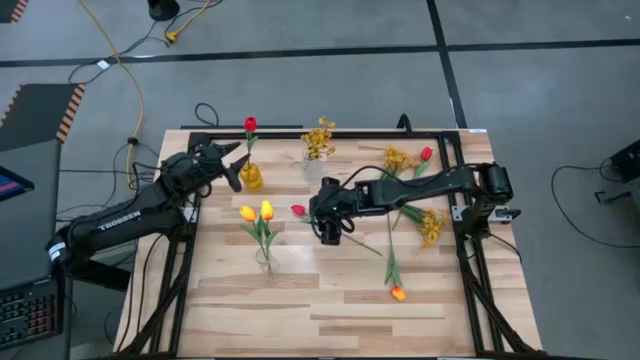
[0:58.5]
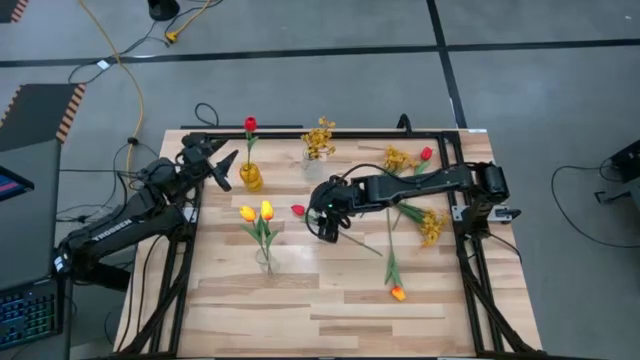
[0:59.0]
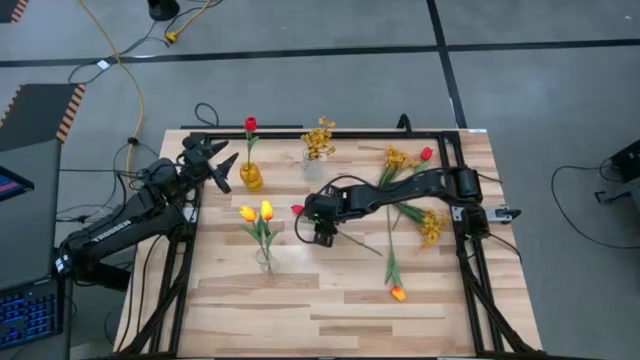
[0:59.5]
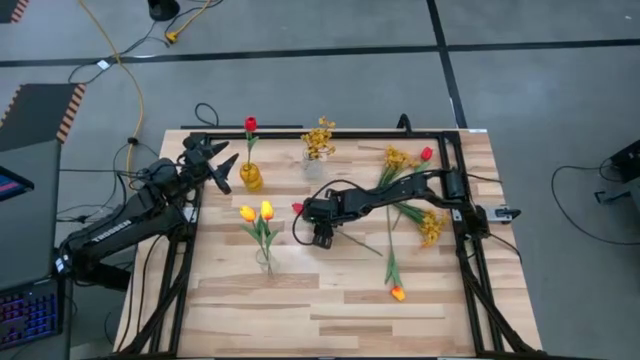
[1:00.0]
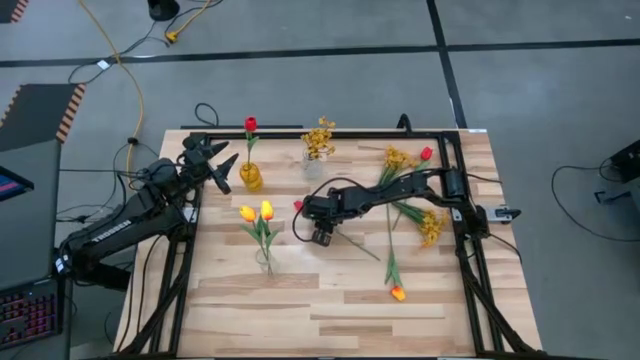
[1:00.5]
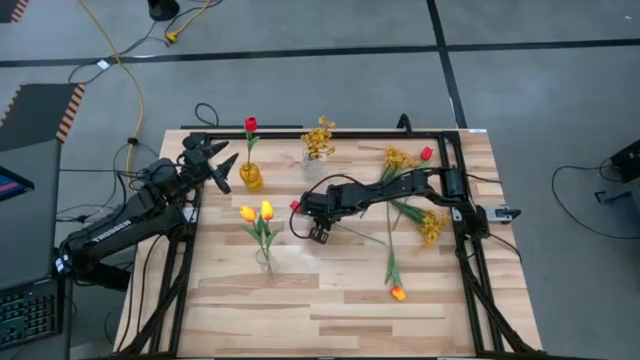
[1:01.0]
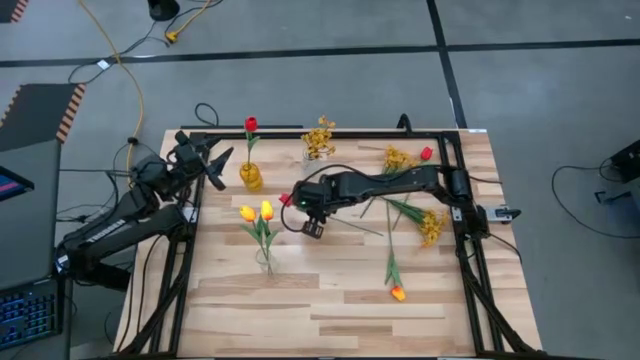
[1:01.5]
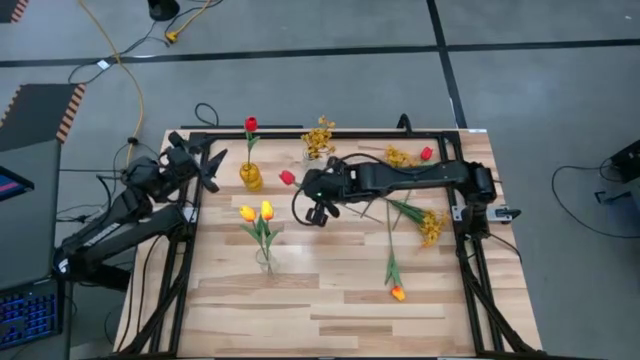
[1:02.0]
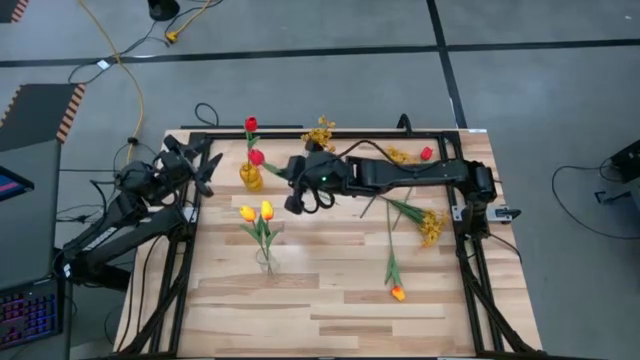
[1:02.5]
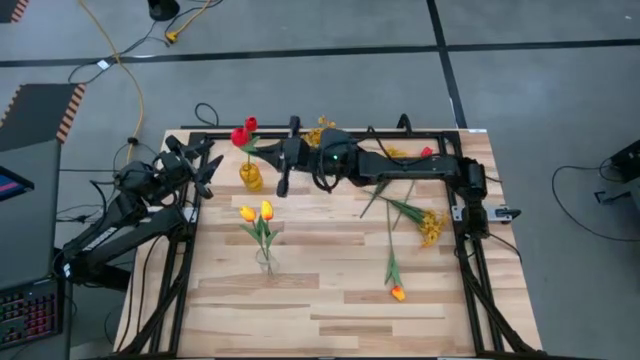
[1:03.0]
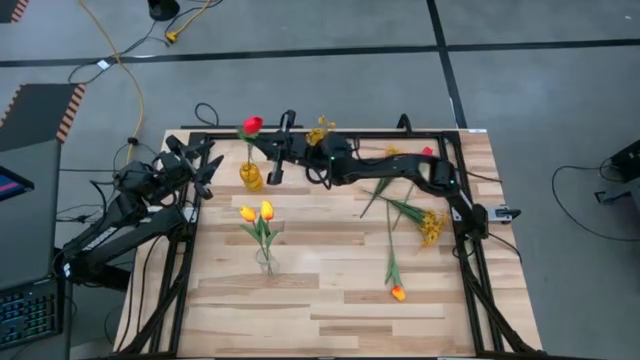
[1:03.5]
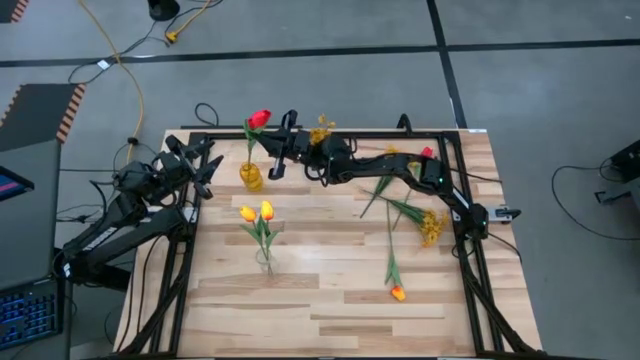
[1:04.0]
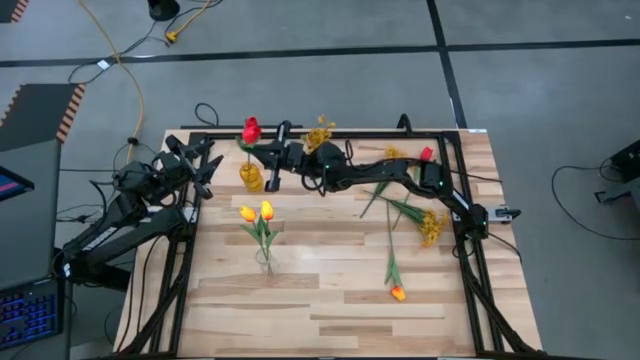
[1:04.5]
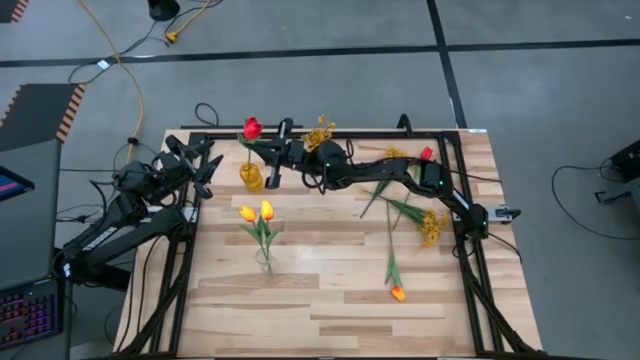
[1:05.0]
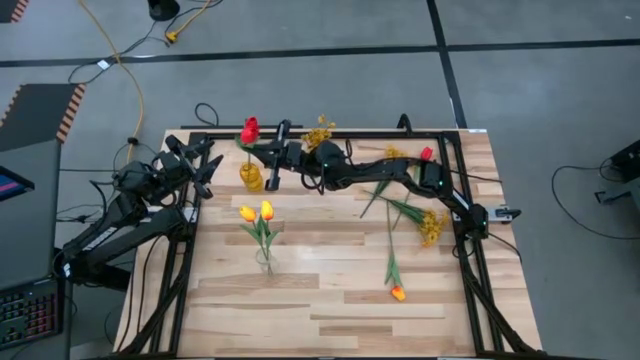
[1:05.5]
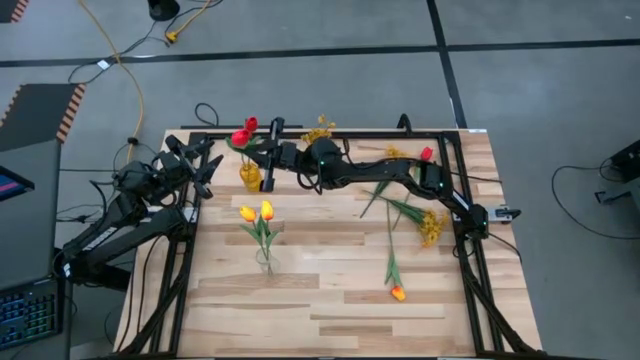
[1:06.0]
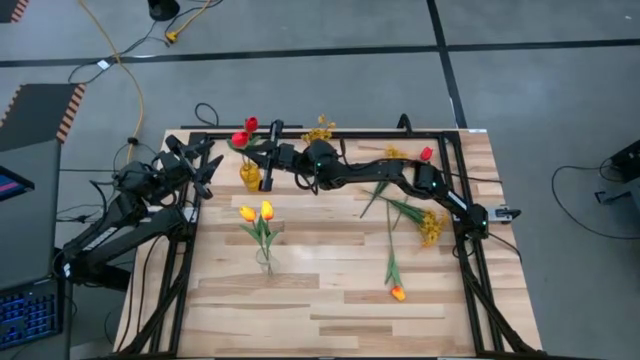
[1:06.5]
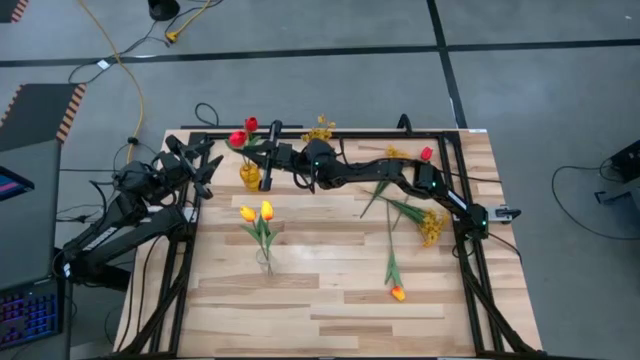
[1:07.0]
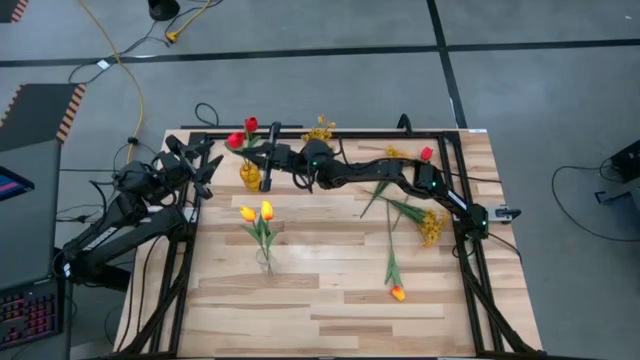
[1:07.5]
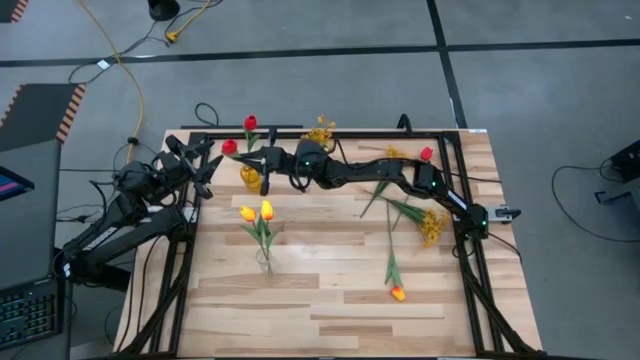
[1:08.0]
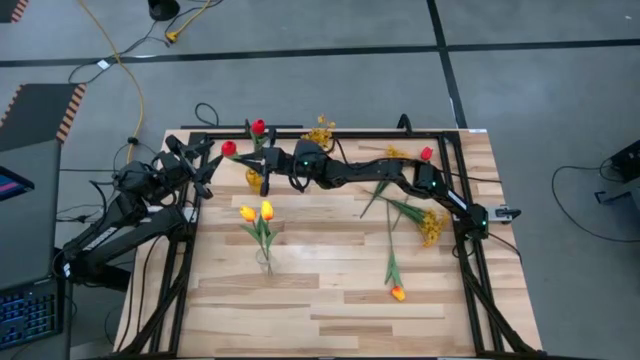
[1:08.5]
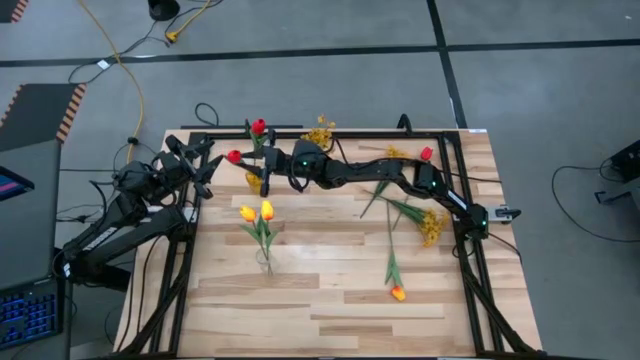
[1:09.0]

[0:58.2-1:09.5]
Task: Sort flowers into vase by color
Put the bottom red flower into the yellow vase

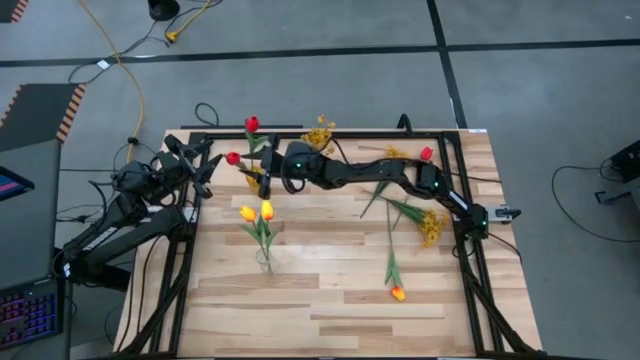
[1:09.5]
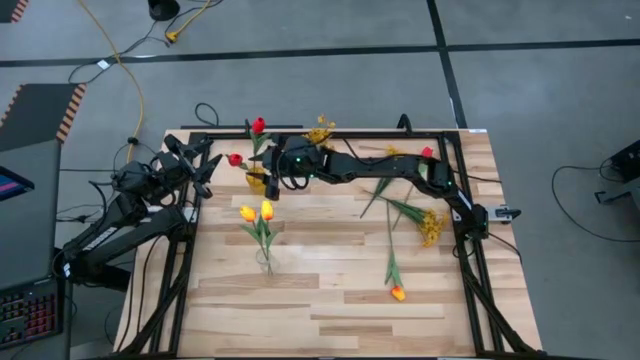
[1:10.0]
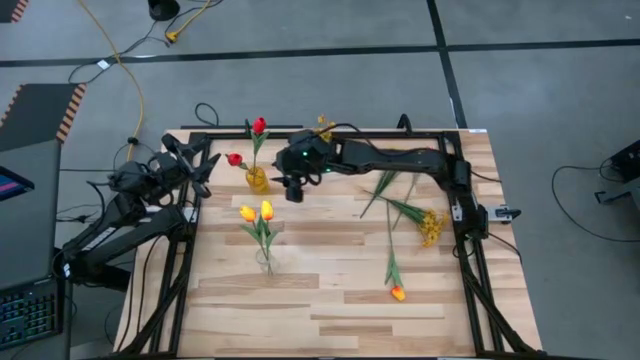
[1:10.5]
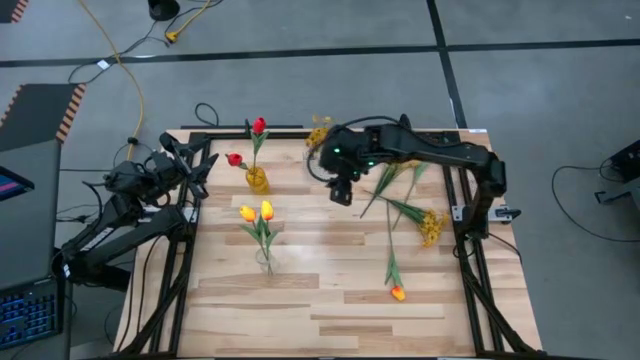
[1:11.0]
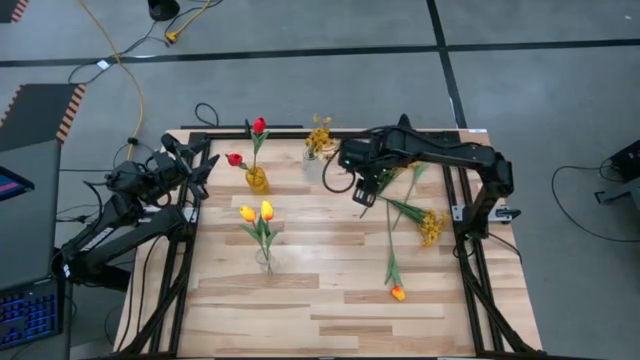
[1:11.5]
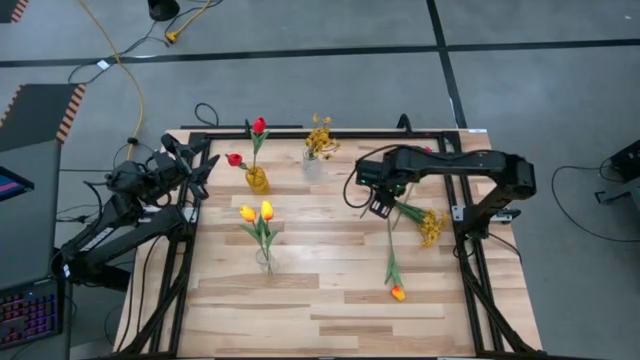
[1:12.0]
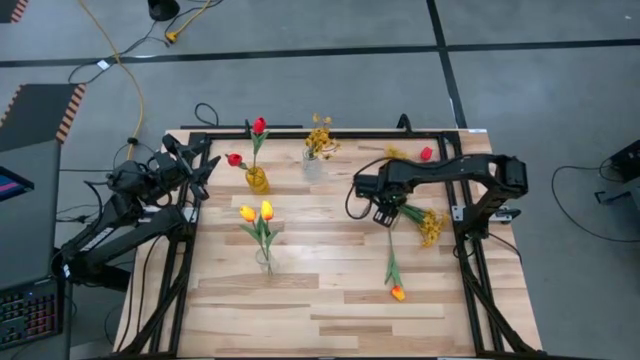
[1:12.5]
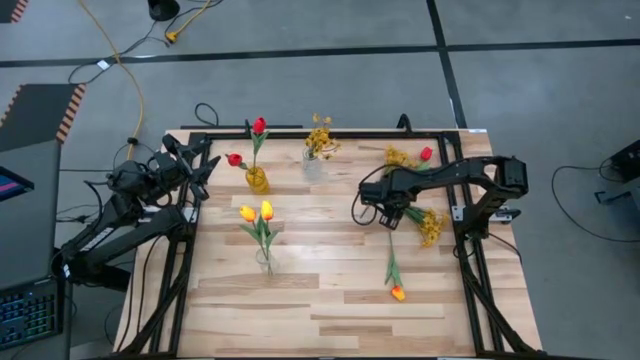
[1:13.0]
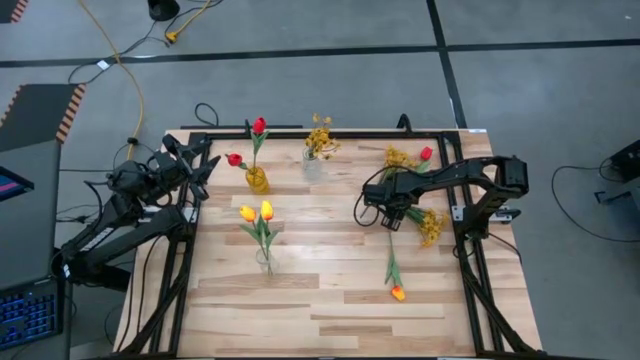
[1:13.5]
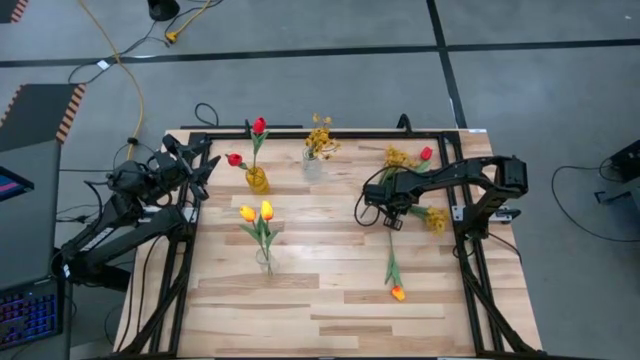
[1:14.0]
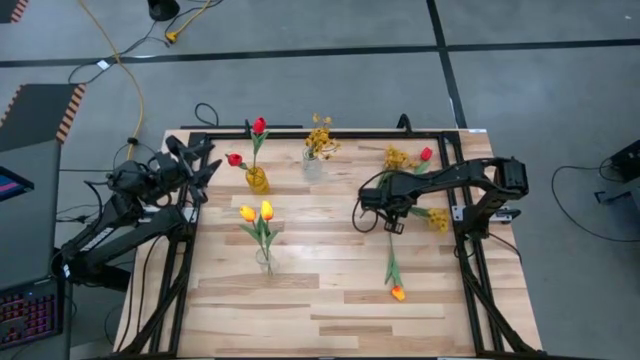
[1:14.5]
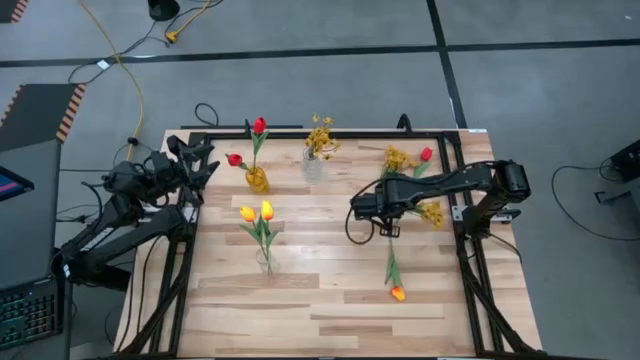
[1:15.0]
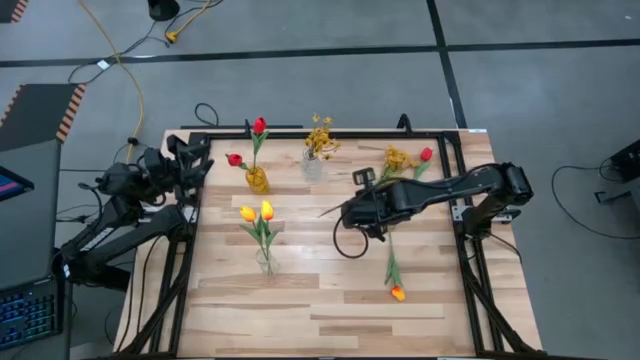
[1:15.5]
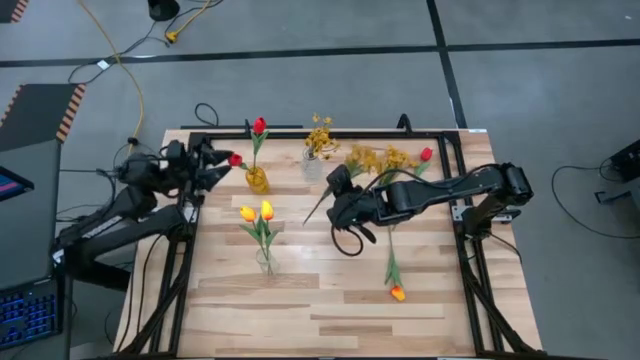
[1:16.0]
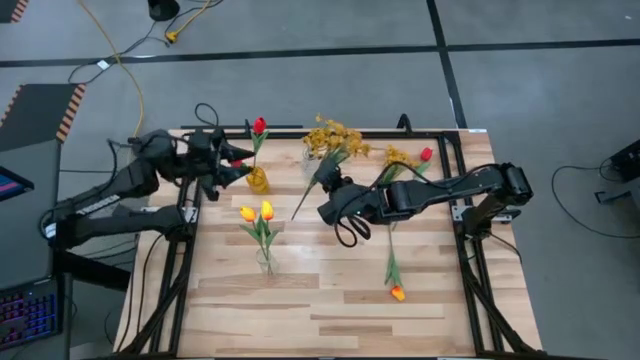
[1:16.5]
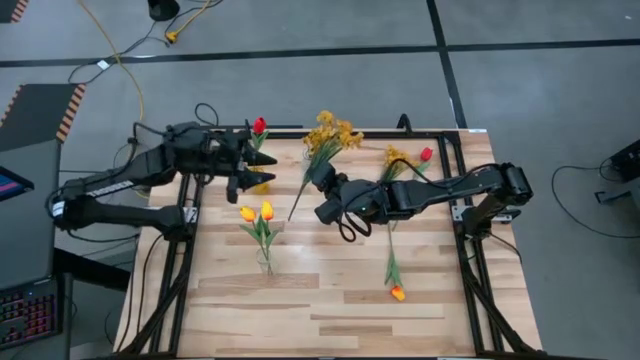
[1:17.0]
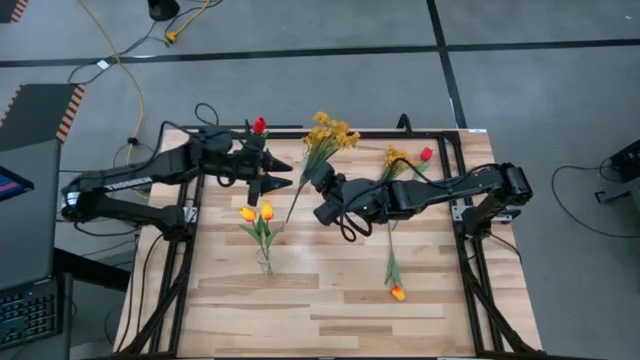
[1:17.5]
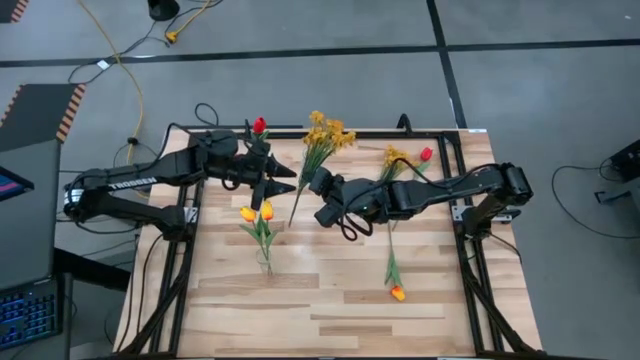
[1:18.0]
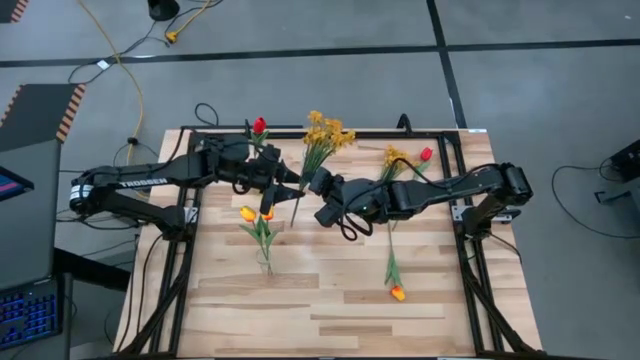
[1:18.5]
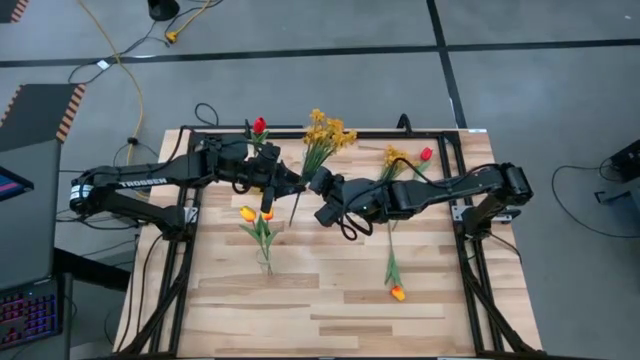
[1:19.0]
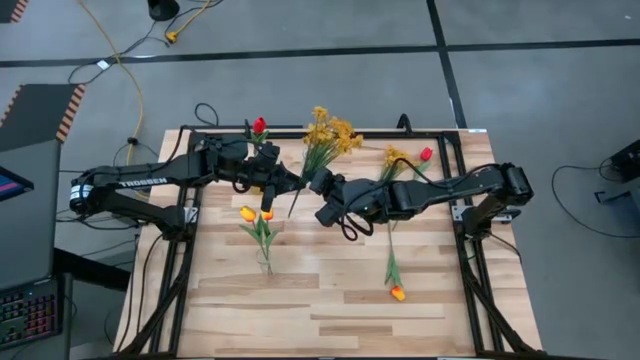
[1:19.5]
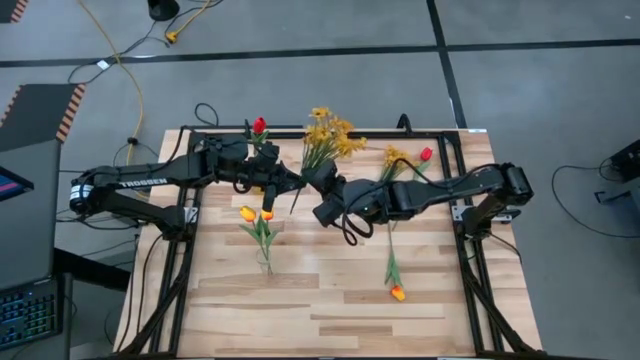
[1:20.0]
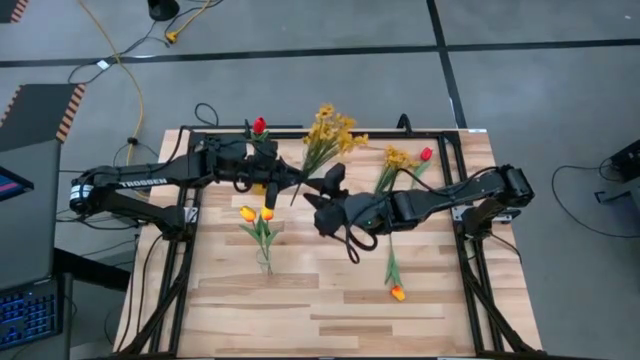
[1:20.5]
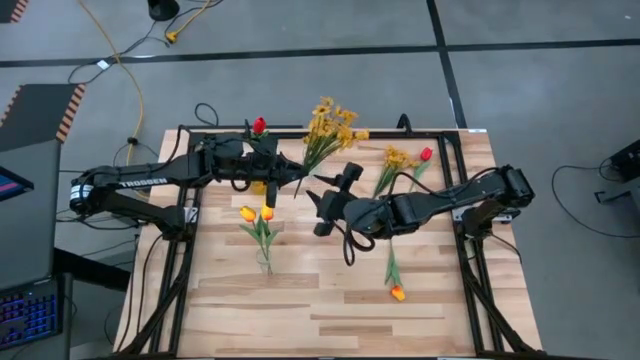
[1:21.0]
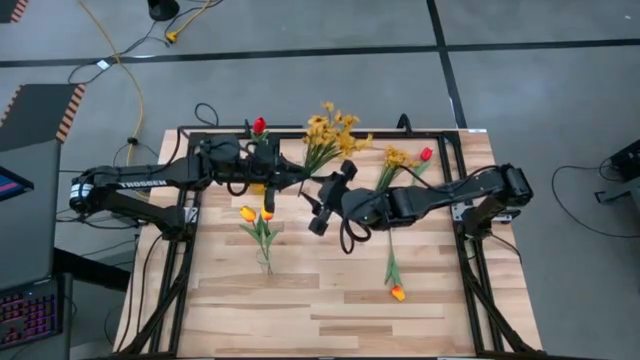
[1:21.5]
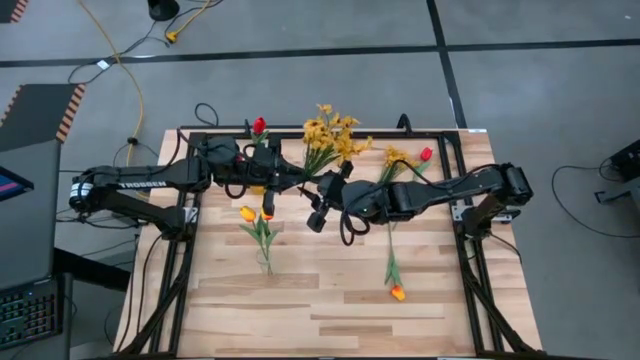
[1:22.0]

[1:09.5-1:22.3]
Put the right yellow flowers into the top transparent vase
